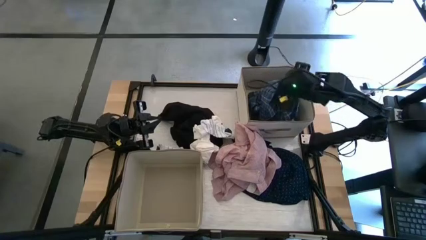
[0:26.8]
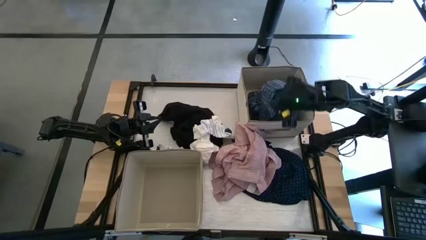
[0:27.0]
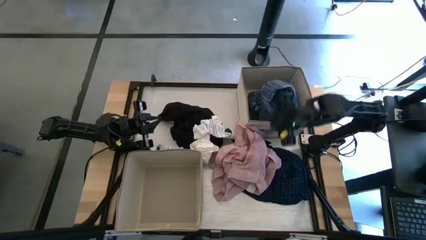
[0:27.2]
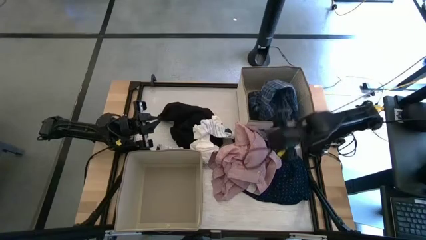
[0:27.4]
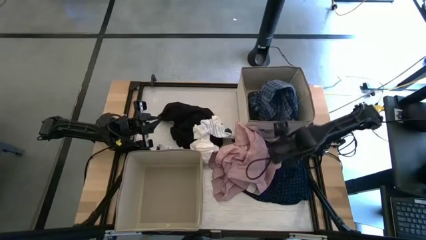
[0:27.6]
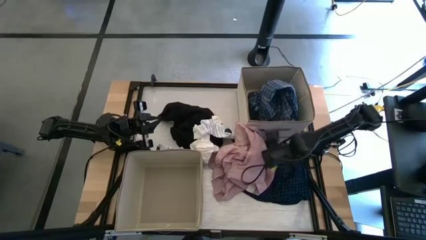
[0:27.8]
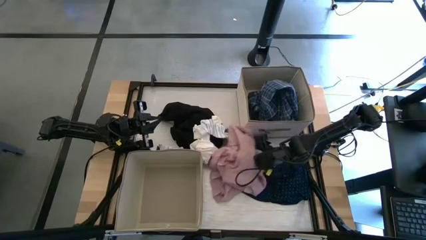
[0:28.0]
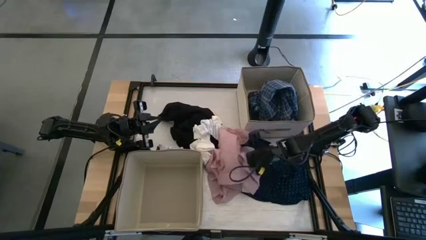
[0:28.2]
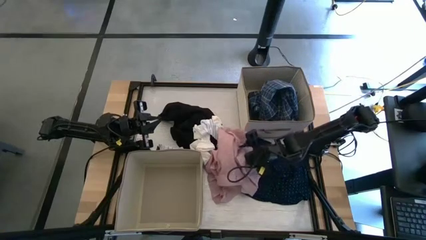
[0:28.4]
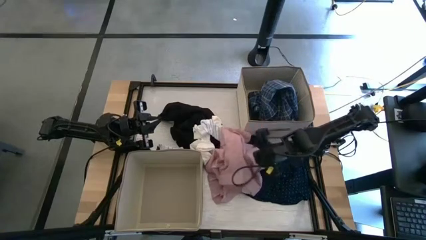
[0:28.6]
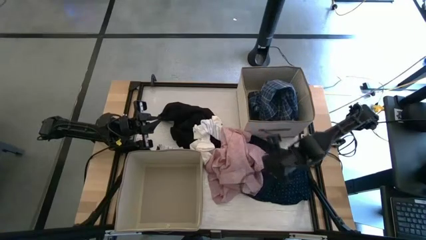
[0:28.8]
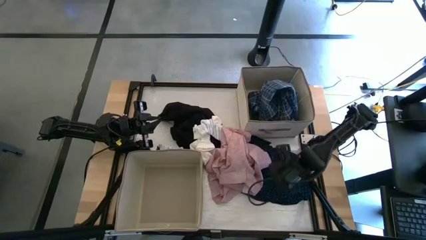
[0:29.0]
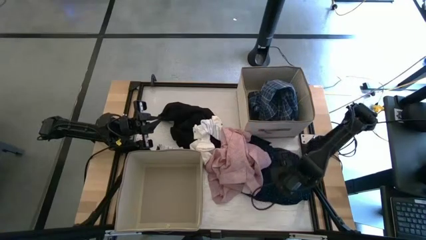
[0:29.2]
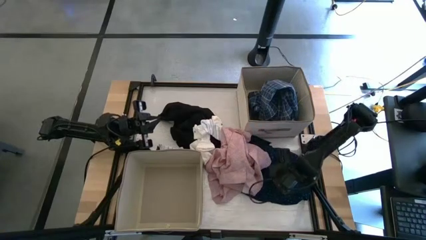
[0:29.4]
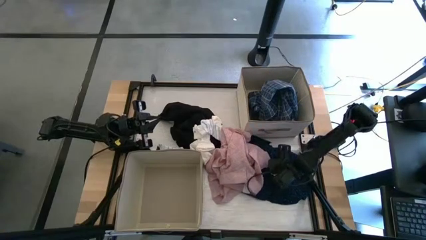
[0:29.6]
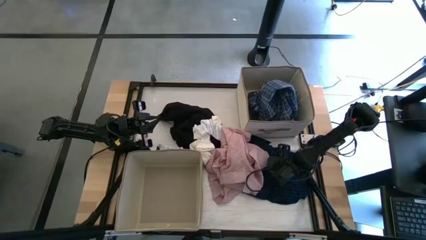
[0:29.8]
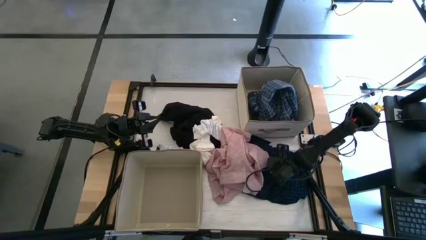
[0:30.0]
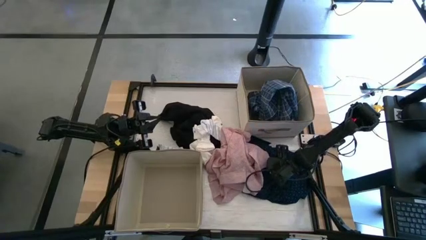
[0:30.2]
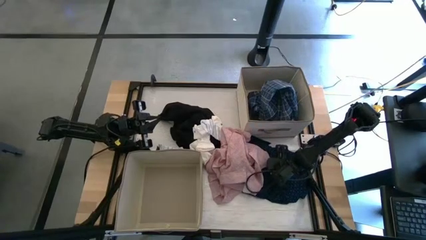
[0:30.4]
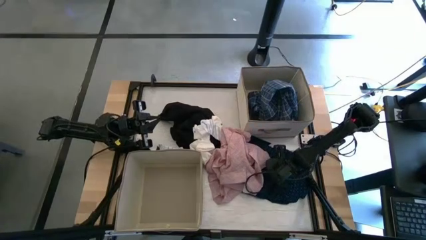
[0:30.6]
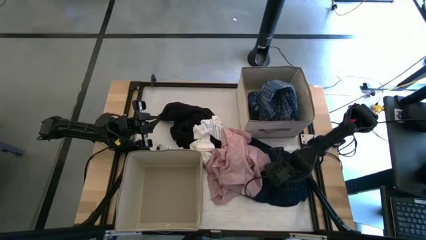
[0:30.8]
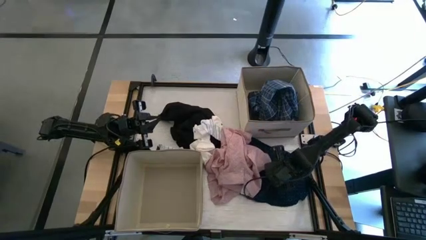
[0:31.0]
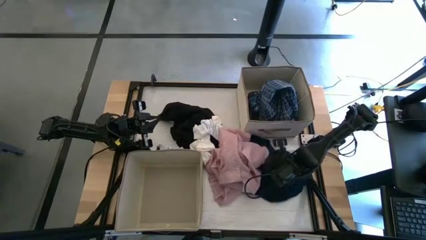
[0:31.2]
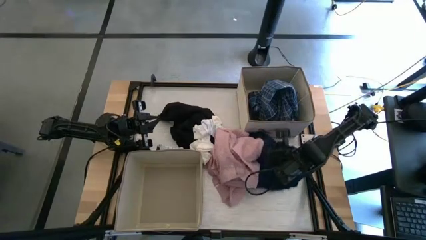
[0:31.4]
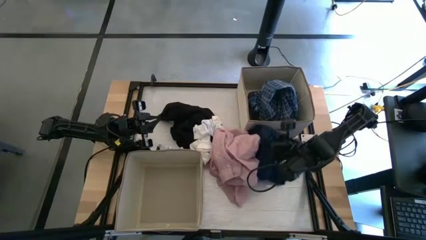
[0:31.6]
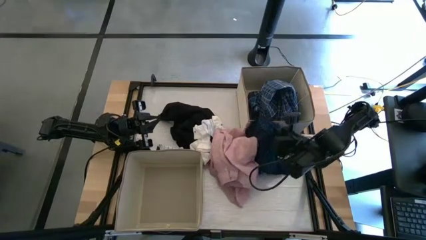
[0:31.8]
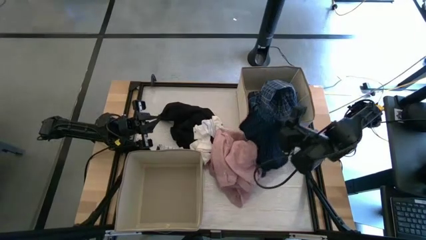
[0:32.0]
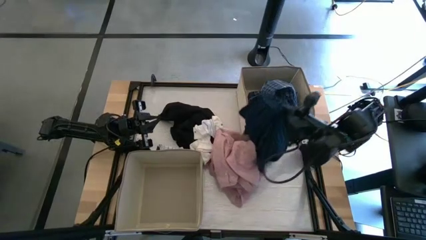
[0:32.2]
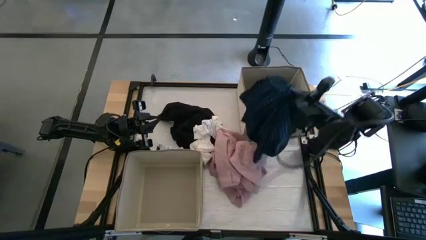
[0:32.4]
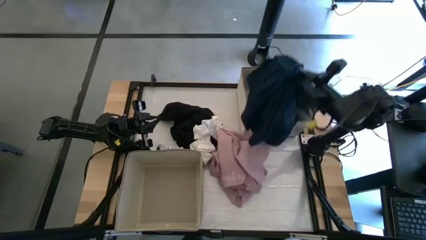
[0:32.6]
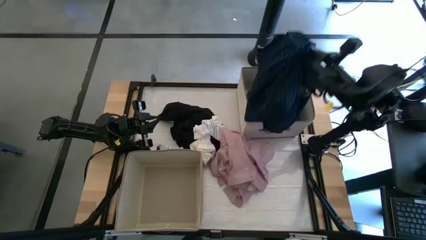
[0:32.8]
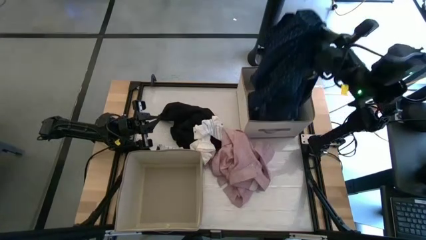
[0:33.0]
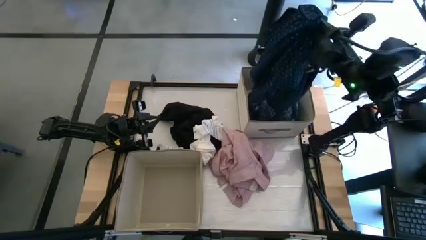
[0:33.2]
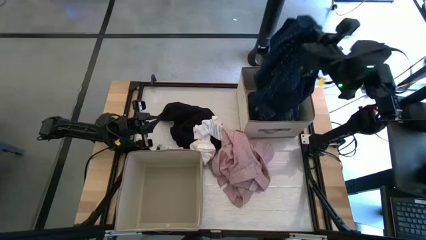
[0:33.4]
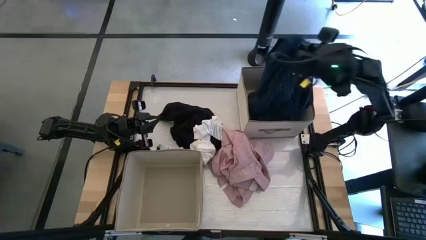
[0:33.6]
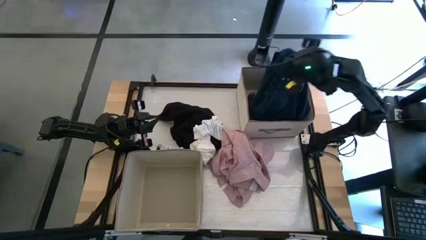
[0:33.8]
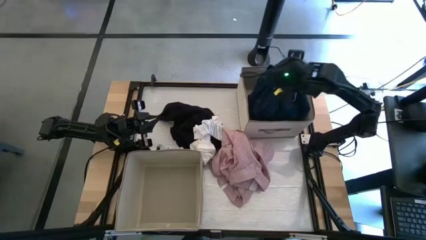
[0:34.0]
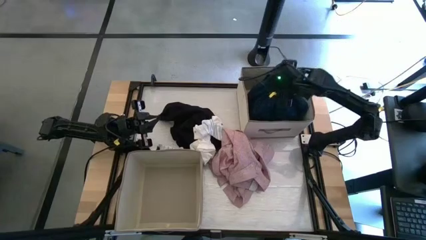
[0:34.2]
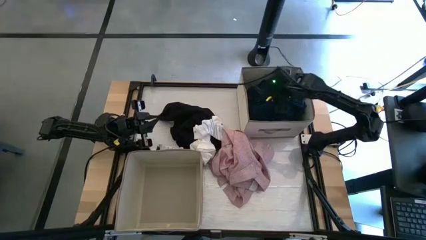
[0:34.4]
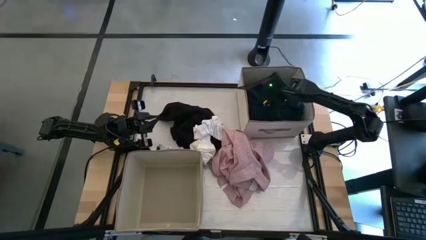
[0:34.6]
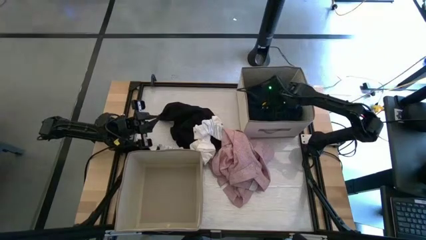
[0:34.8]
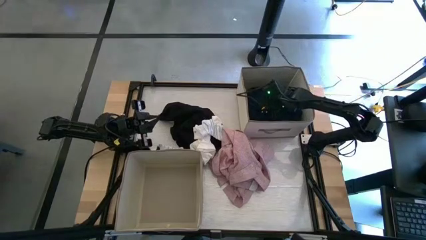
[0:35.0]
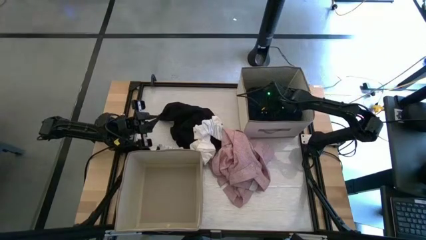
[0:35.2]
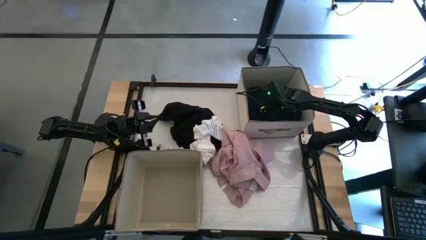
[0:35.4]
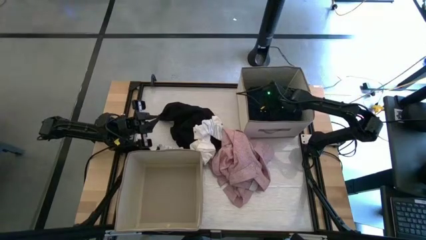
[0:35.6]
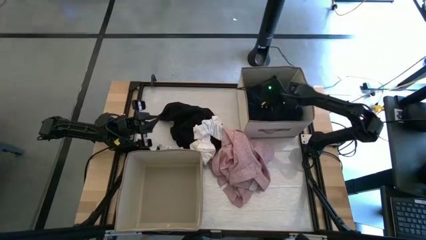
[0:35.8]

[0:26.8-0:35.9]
Task: Sort clothes
Put the blue patterned polo shirt into the right laundry organizer

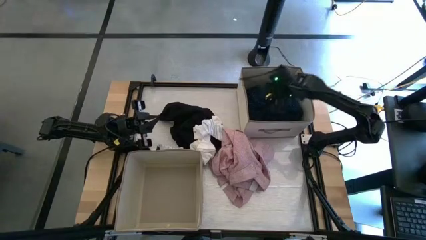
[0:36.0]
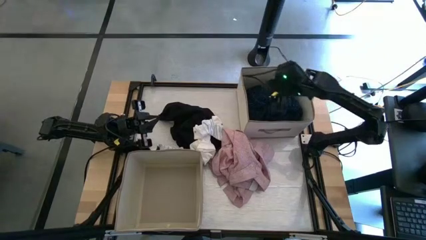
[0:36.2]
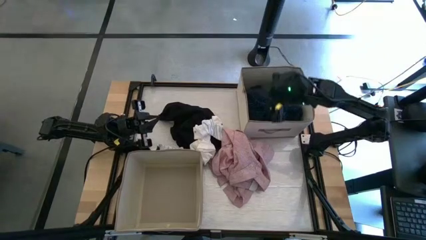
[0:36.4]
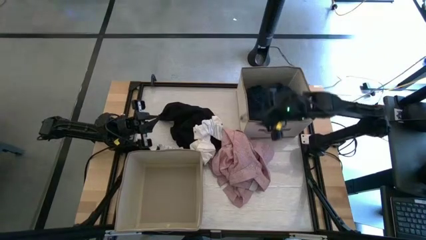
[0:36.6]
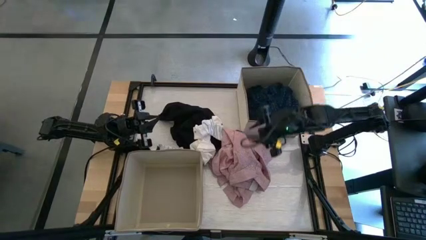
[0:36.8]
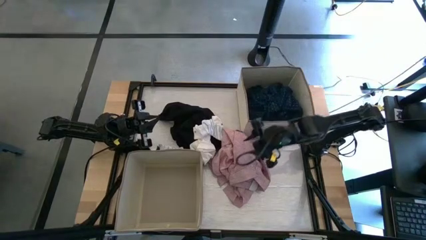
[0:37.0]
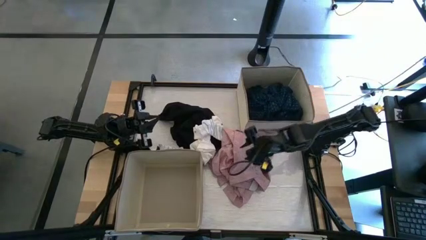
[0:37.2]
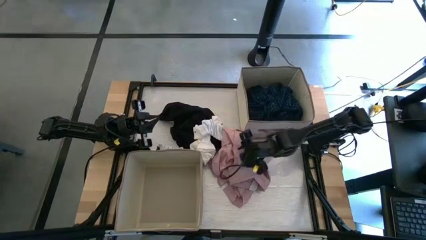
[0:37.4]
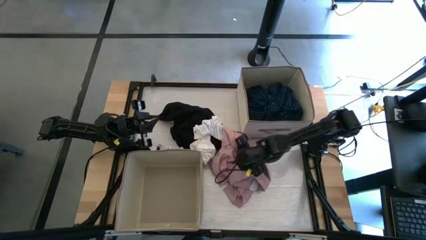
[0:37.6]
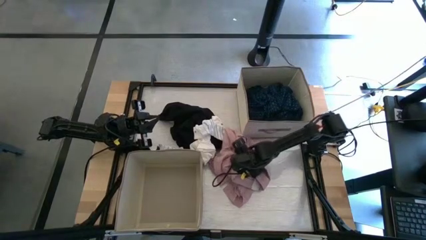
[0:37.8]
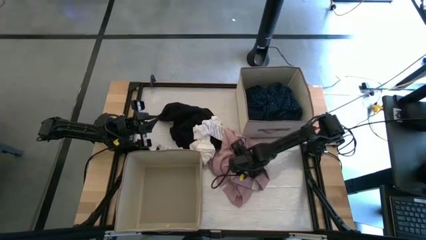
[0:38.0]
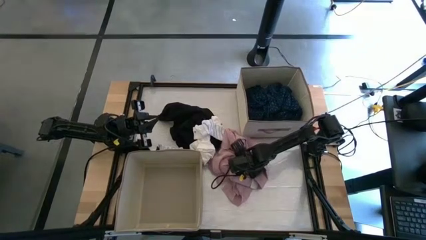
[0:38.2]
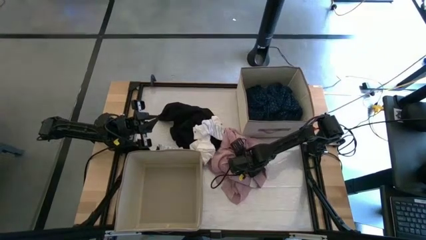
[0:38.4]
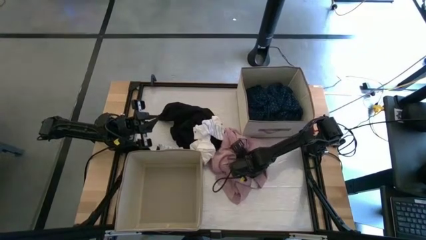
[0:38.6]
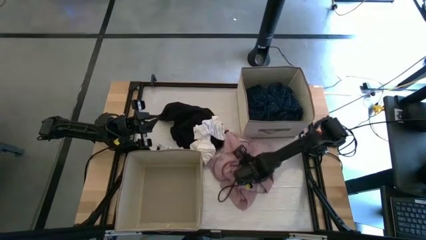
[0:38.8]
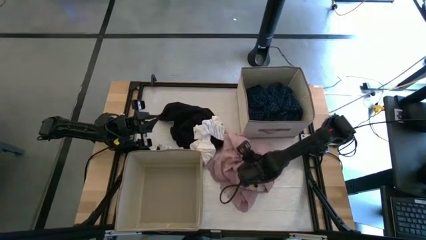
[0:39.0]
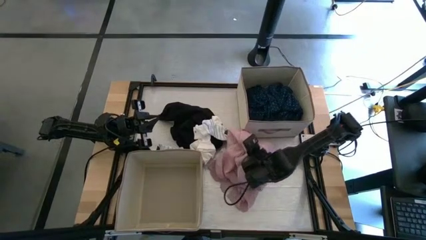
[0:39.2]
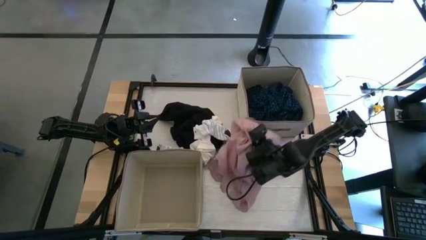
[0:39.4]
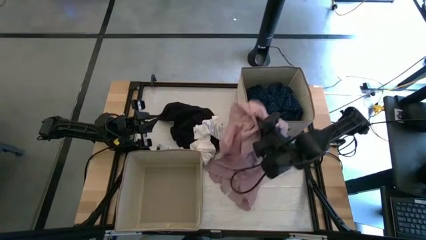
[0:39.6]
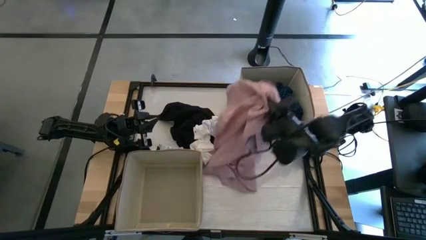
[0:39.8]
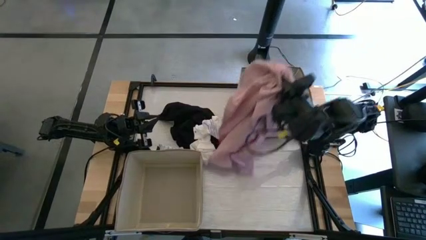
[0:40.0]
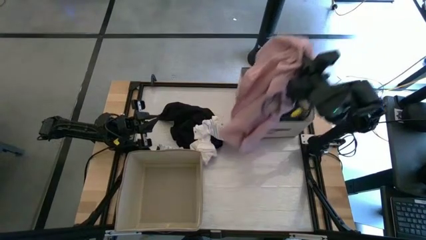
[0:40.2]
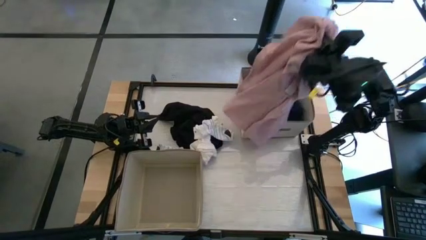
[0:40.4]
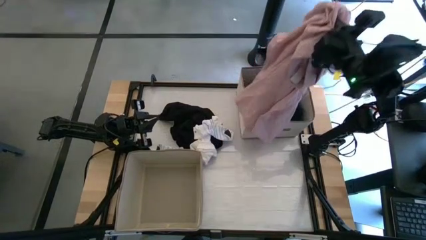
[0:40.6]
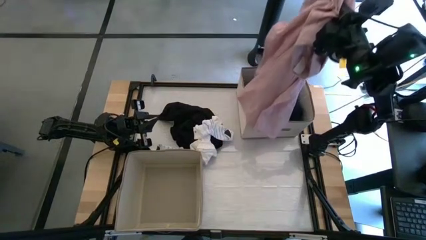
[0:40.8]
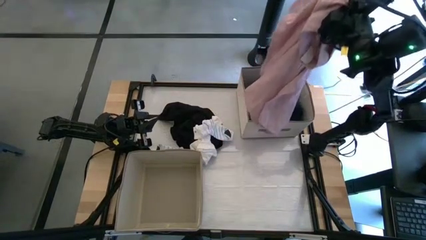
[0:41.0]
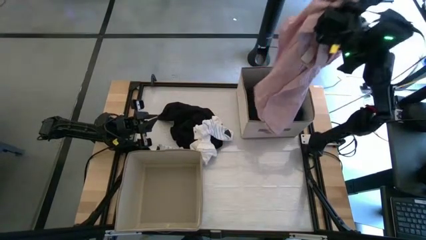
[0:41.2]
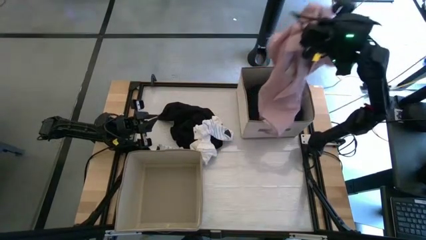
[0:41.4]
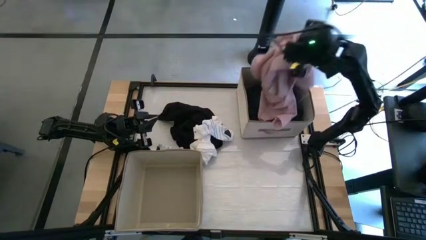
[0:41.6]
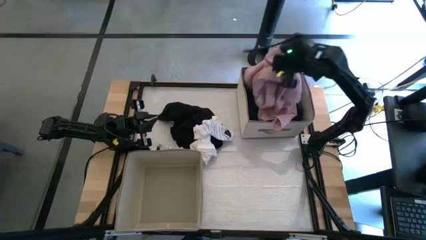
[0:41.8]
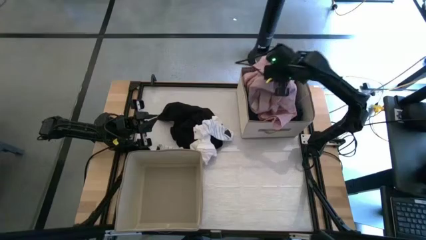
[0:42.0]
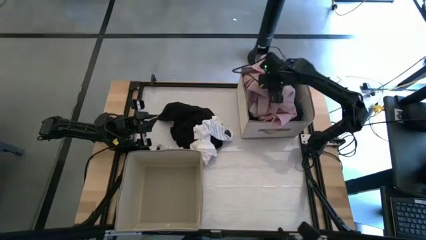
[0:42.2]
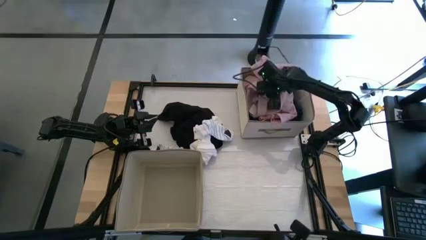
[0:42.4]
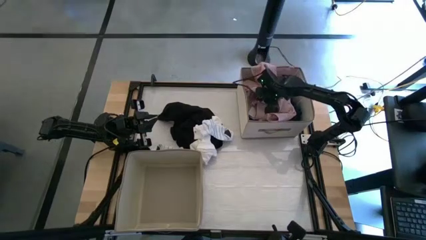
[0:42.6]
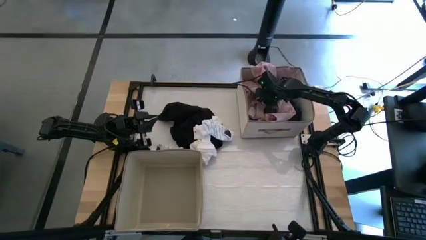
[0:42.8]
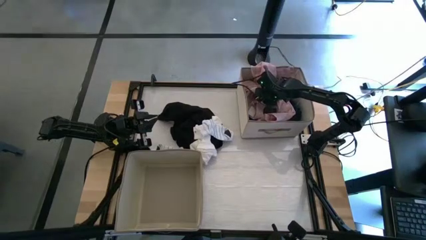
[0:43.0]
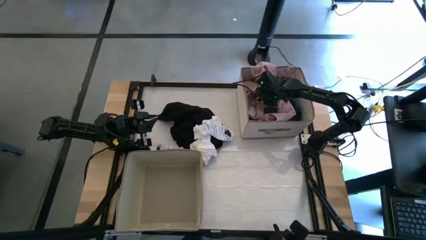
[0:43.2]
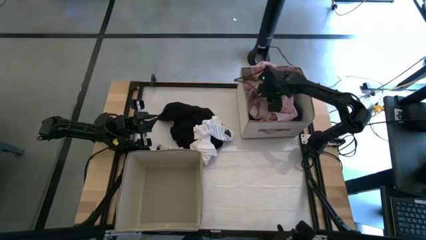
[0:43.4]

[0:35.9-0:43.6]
Put the red polo shirt into the right laundry organizer
